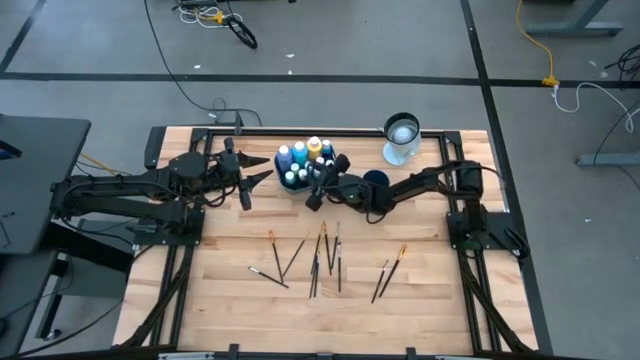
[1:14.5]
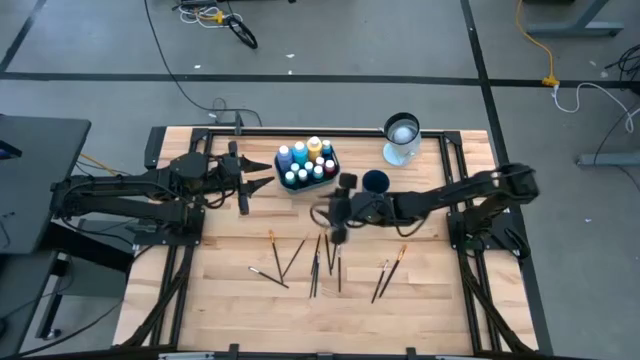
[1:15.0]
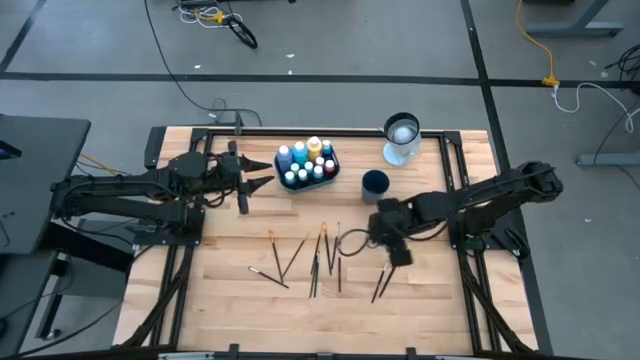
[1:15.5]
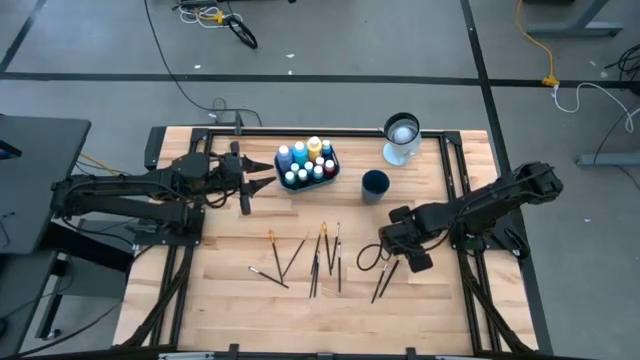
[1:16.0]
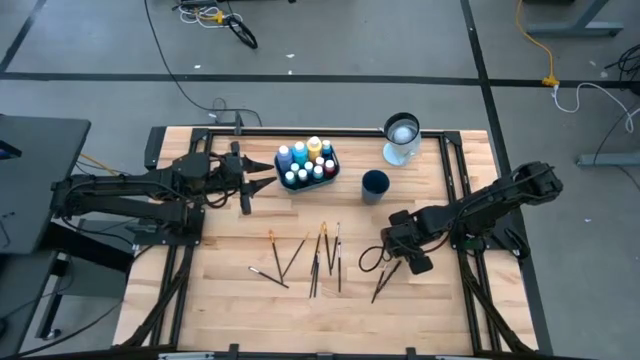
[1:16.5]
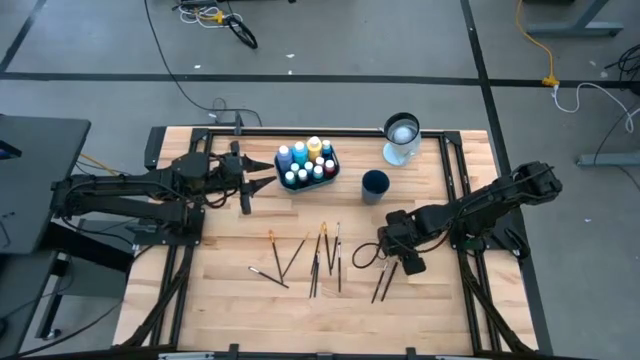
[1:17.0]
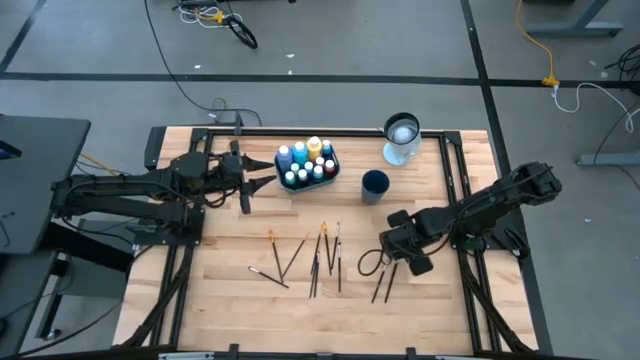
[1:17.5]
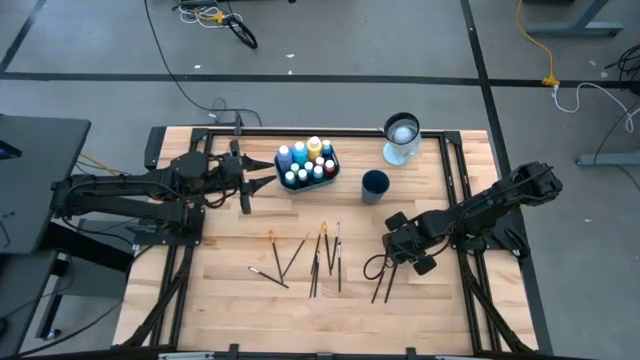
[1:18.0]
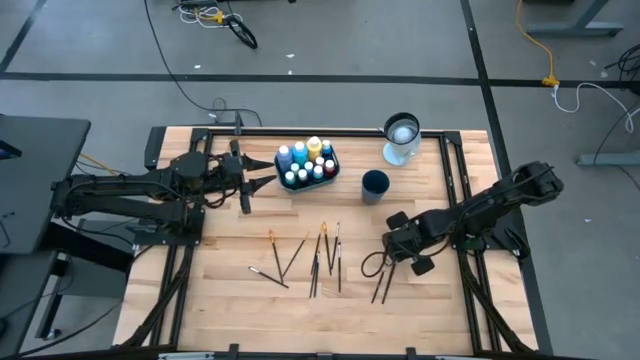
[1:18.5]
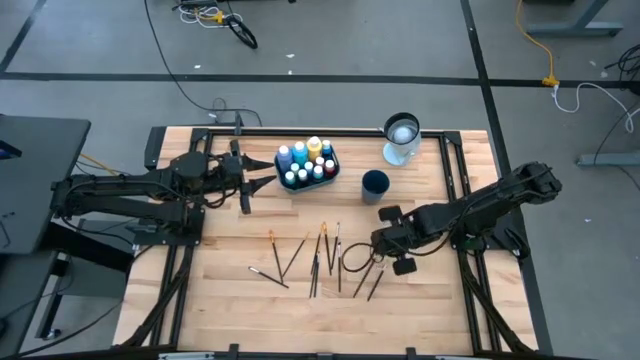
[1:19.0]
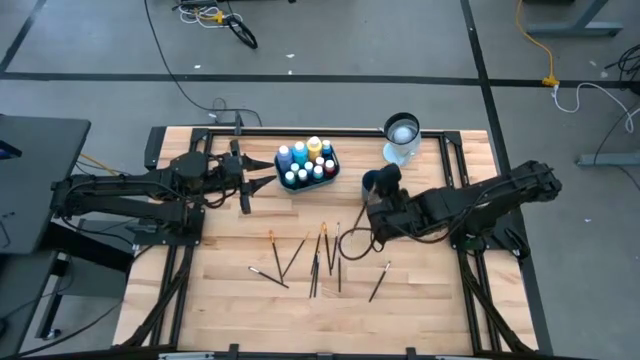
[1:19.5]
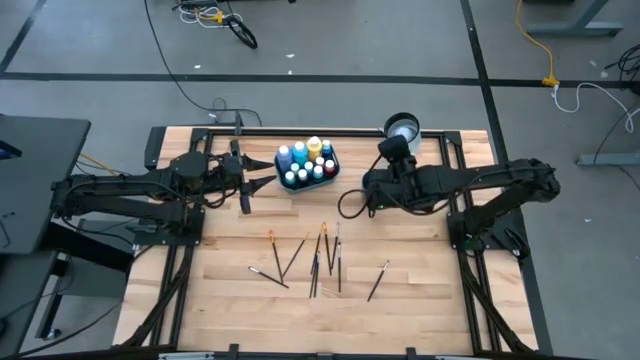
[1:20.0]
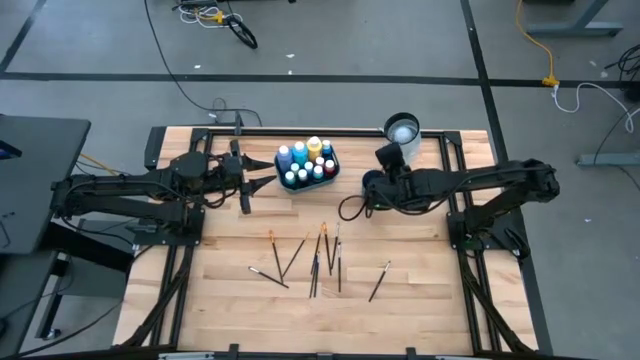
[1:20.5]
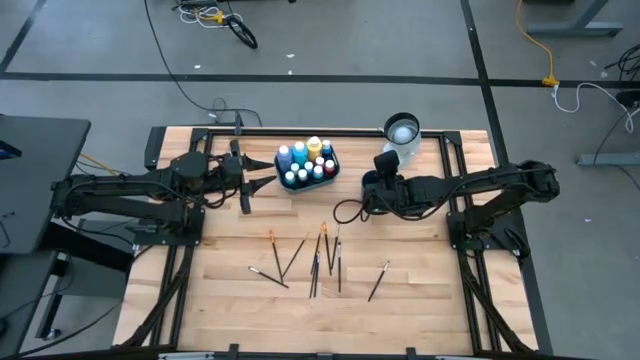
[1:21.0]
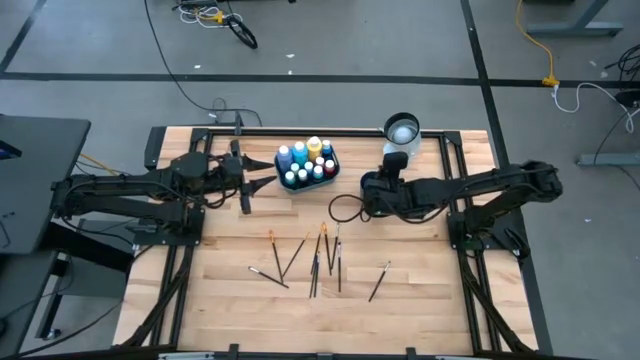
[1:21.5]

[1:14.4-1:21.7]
Task: Pick & Place Paint Supplies
Put the gold paint brush into the blue cup

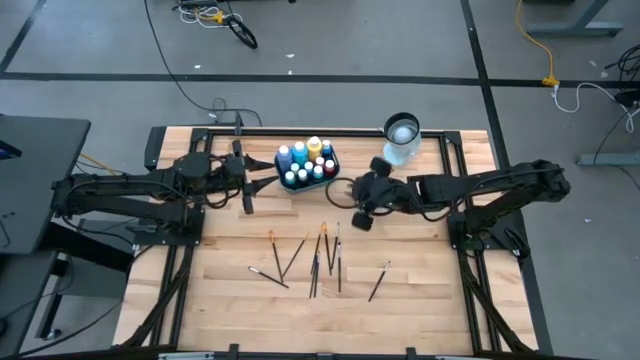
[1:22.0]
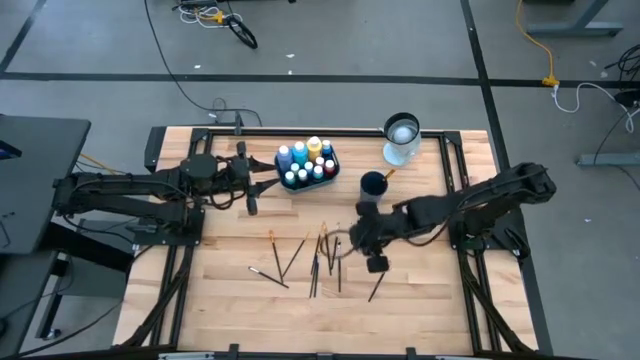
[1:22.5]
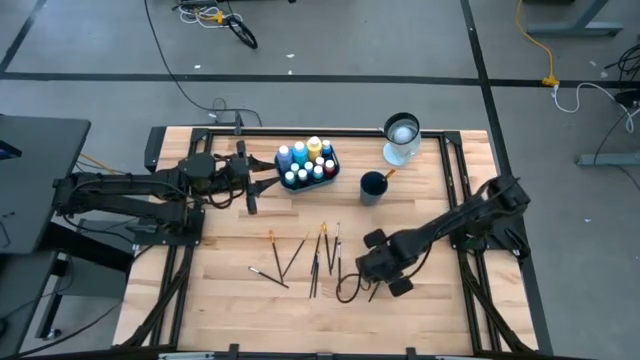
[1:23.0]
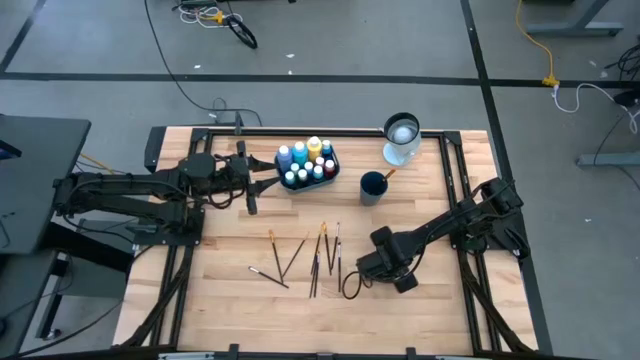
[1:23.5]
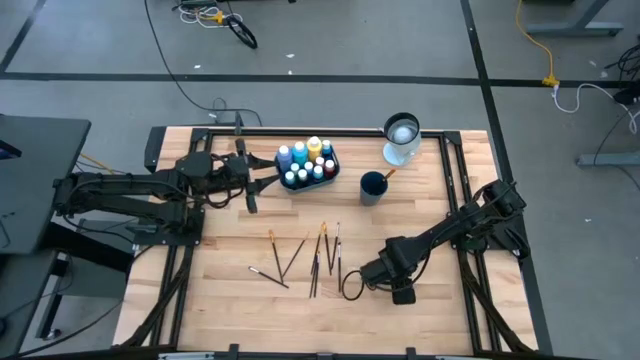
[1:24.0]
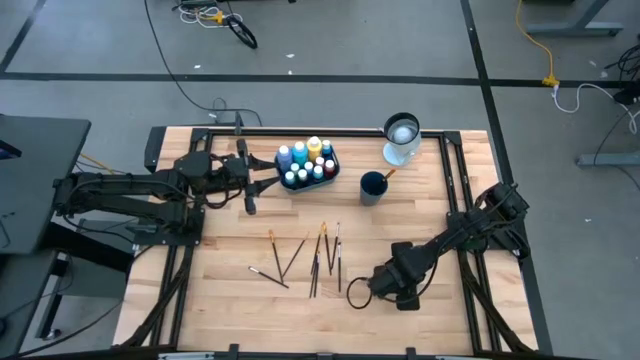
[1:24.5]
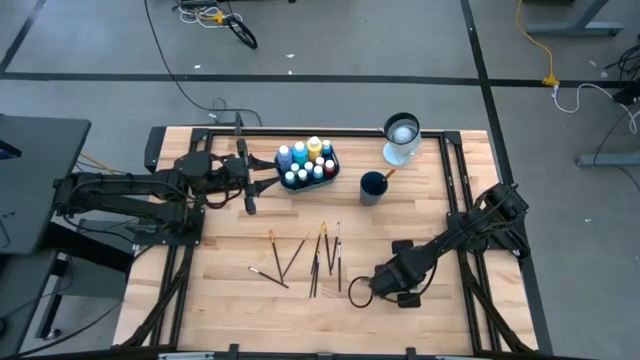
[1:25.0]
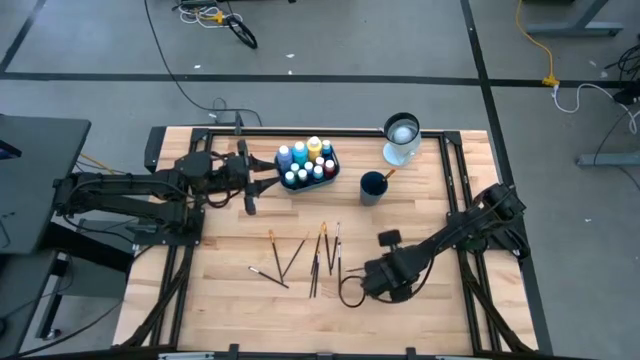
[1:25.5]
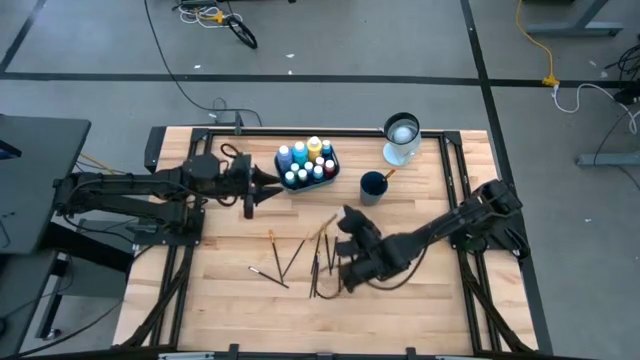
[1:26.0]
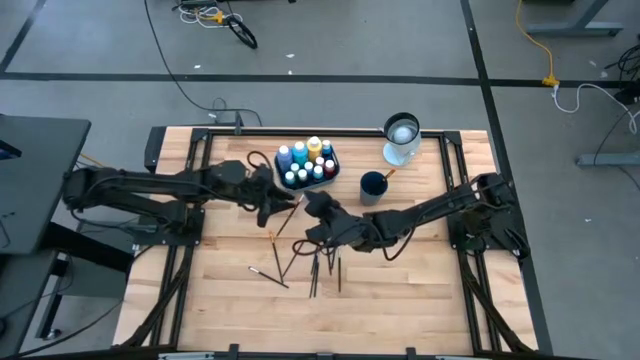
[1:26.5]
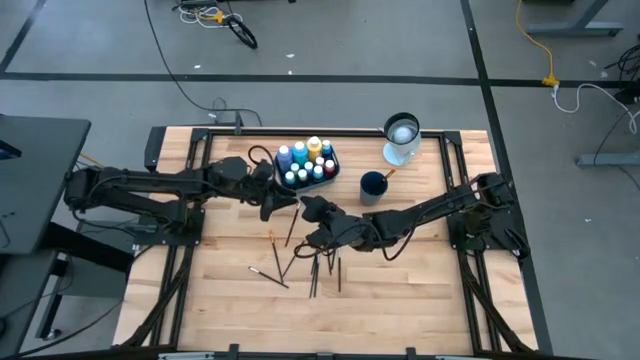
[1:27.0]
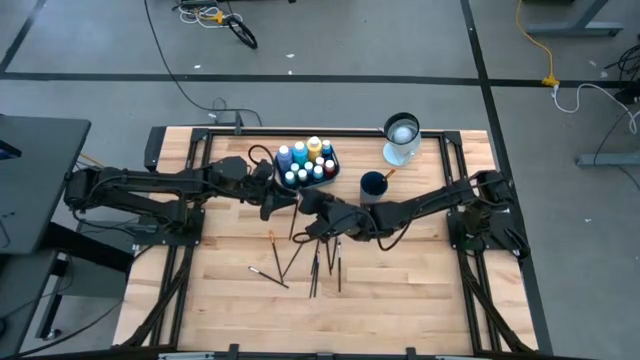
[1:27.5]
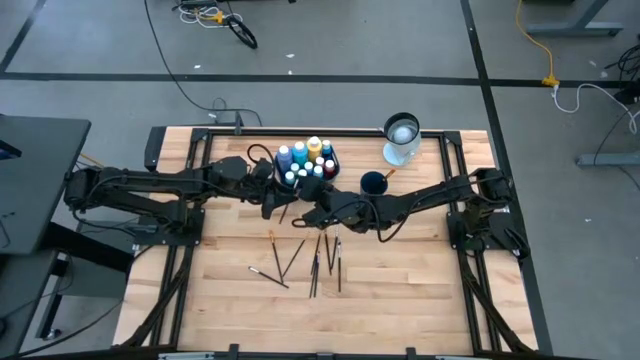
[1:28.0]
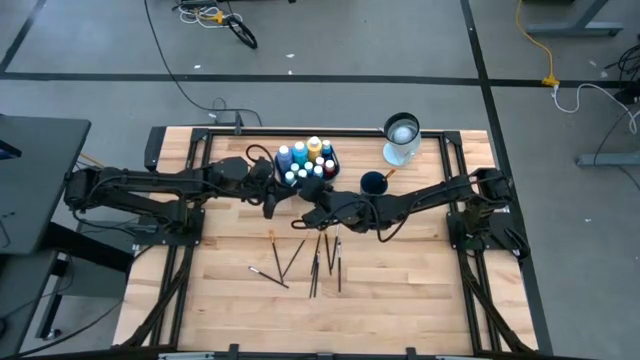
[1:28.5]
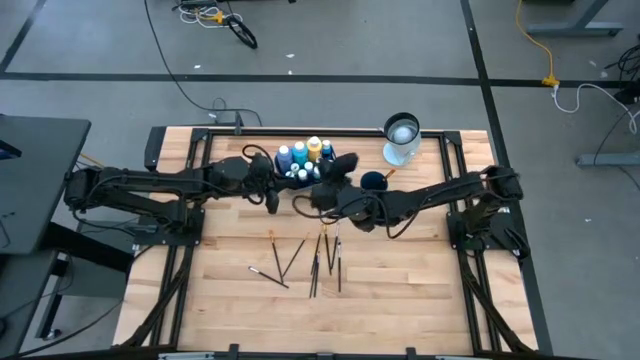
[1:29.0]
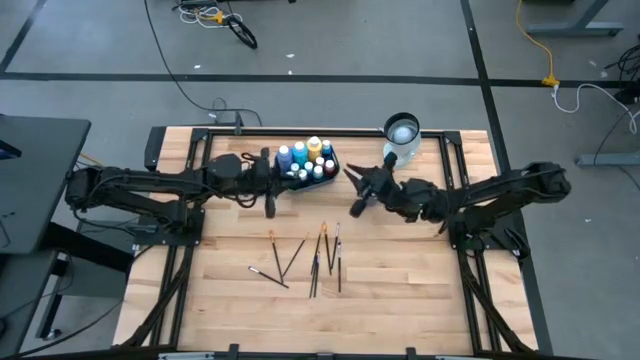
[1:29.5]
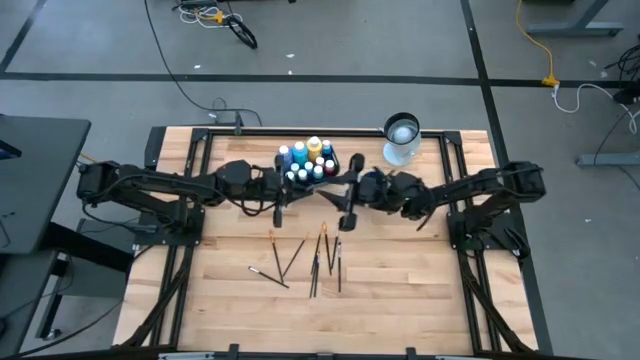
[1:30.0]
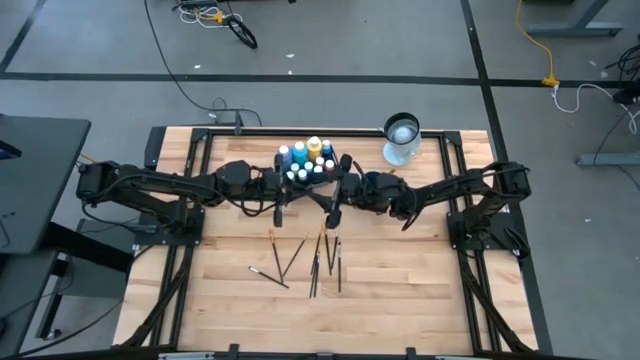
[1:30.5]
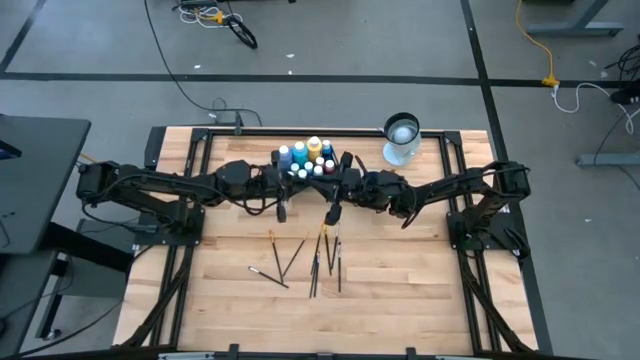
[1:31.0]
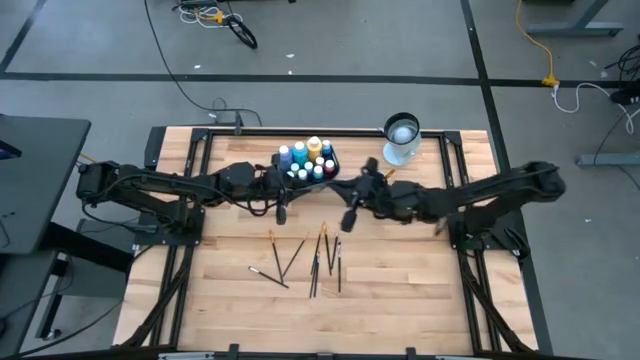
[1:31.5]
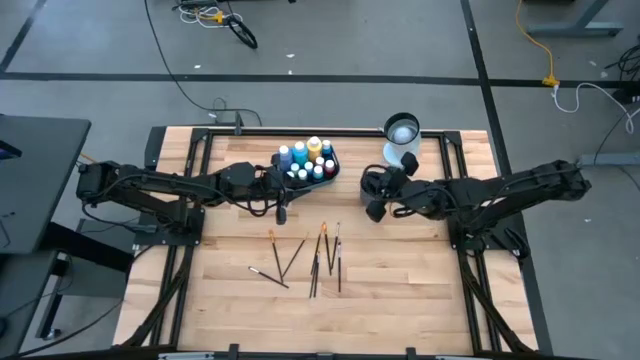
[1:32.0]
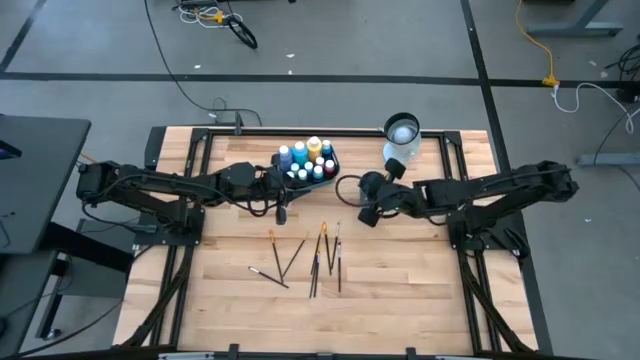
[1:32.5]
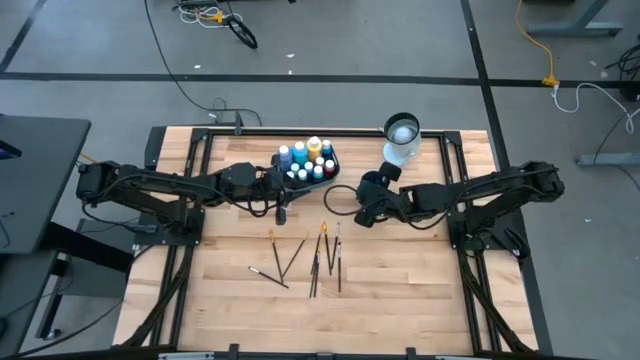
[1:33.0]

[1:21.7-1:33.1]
Put the silver paint brush into the blue cup

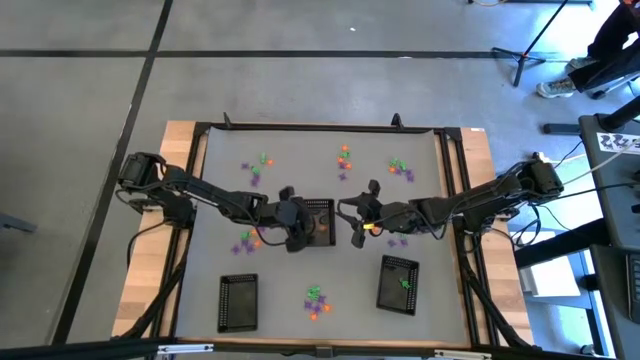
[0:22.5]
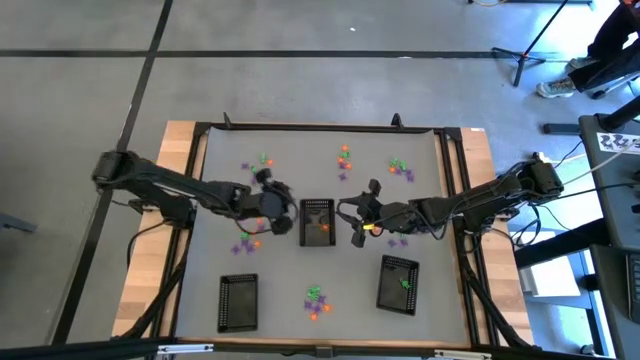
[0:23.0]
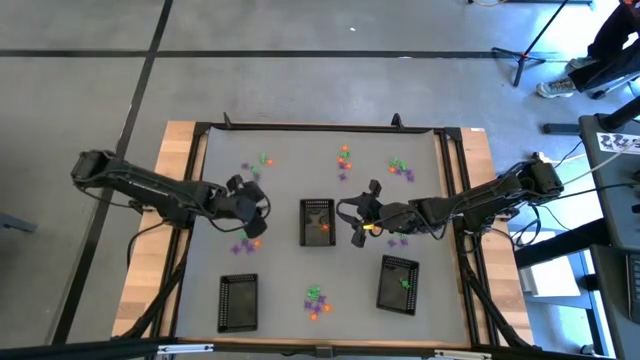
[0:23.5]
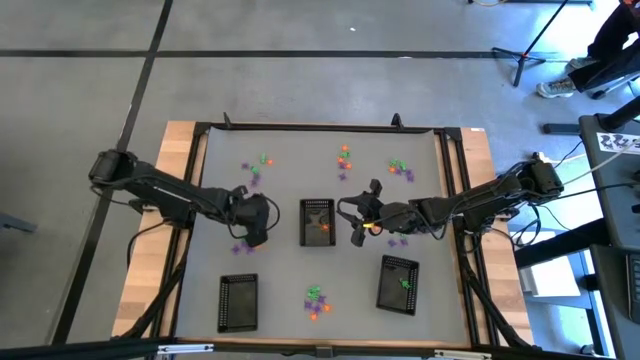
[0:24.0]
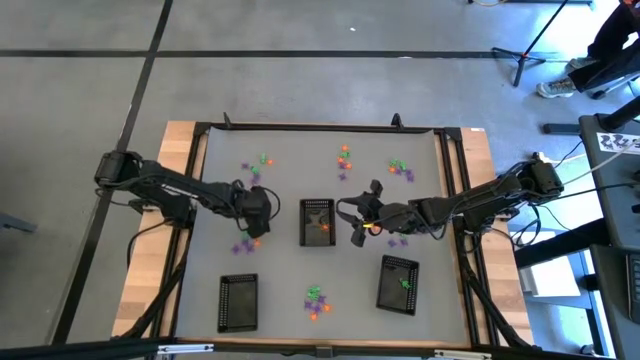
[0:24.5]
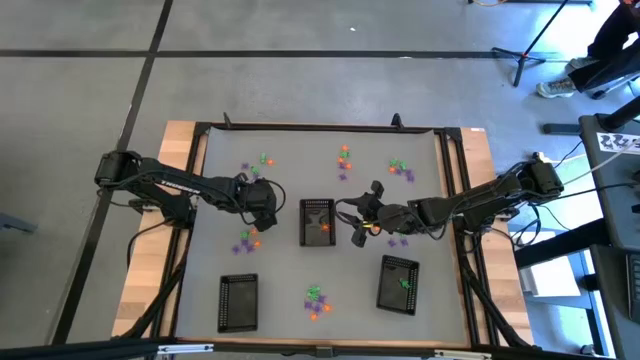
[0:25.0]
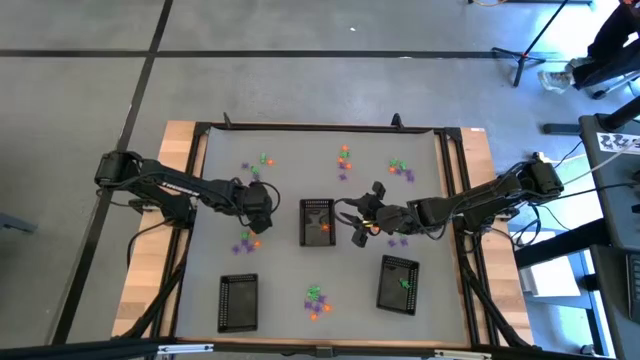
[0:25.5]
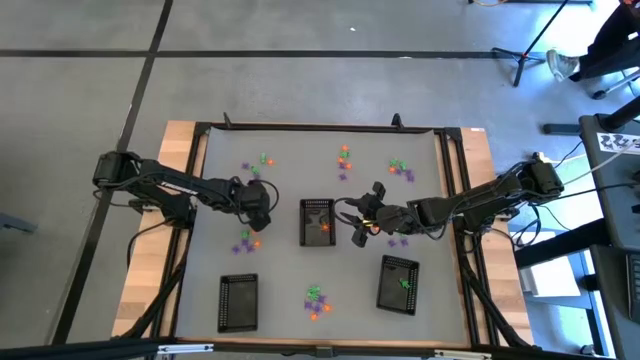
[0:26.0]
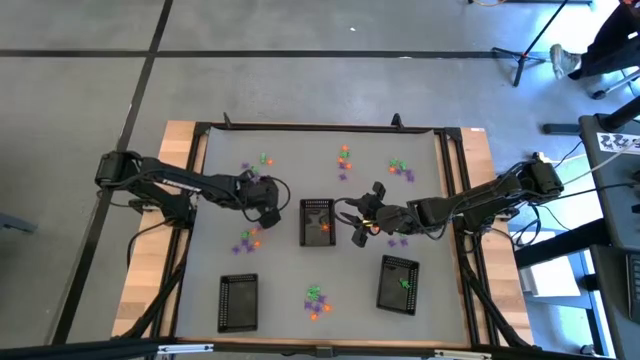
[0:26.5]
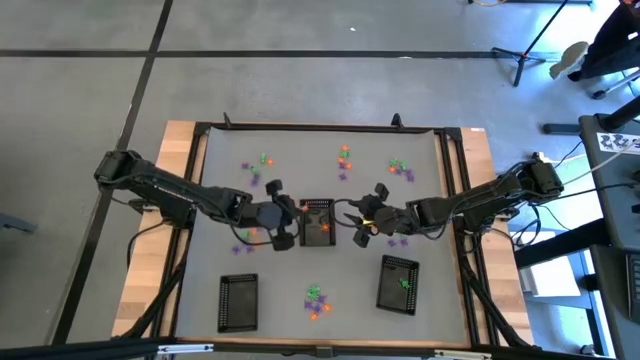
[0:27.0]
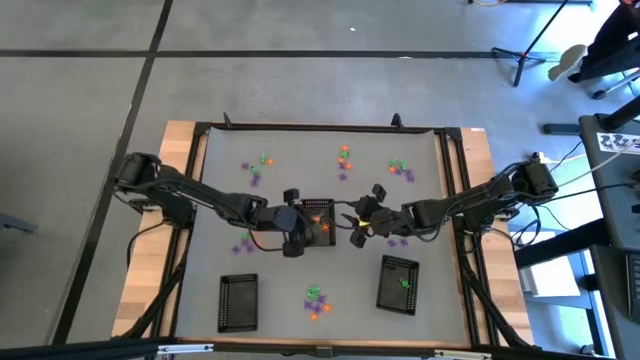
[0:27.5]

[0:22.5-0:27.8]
Task: Sort Halloween decoration
Put the orange spider toy into the top black bin
